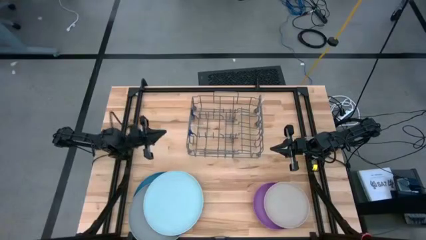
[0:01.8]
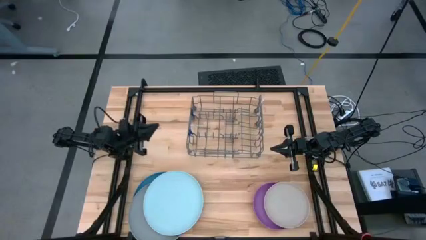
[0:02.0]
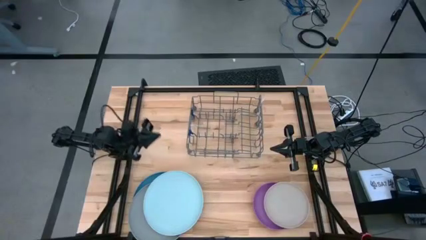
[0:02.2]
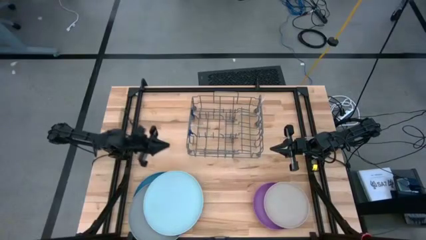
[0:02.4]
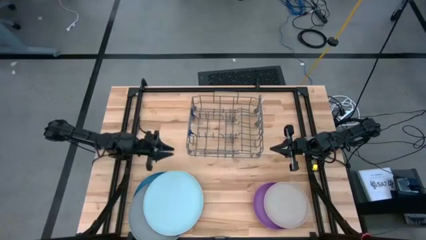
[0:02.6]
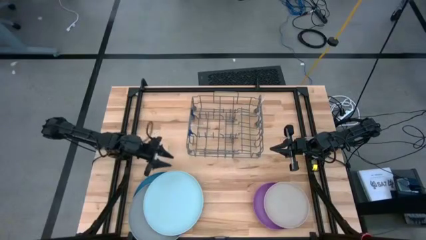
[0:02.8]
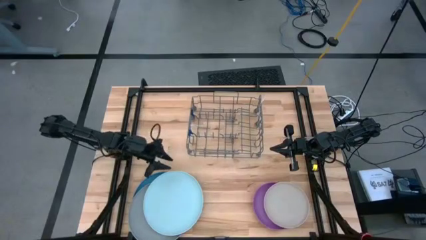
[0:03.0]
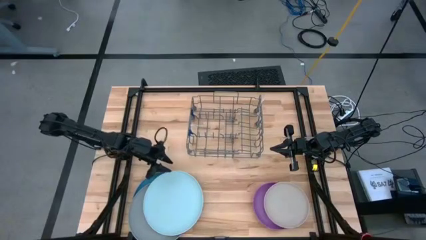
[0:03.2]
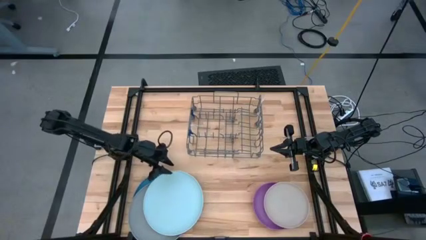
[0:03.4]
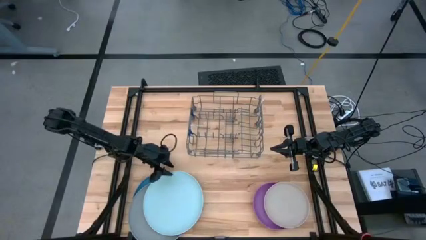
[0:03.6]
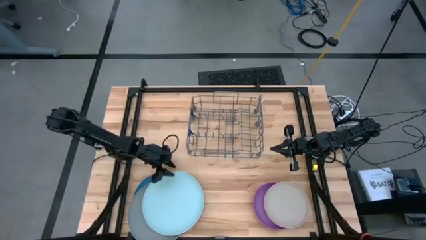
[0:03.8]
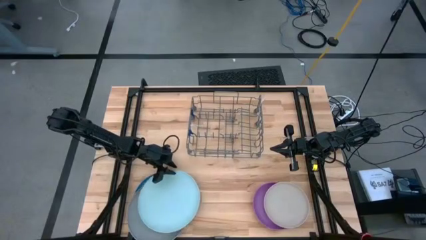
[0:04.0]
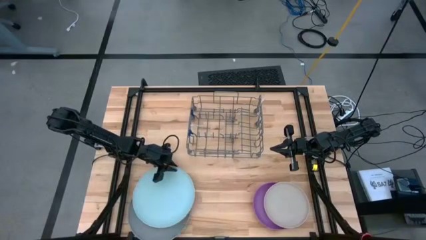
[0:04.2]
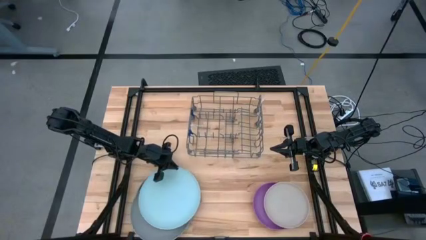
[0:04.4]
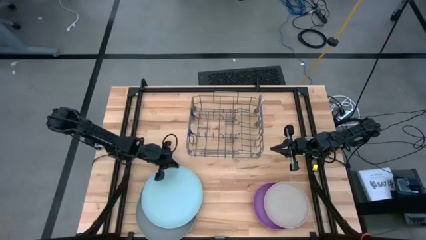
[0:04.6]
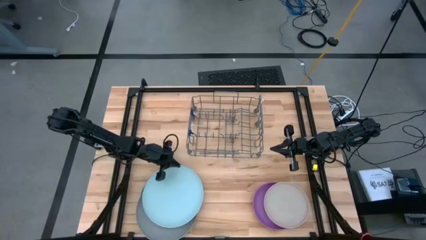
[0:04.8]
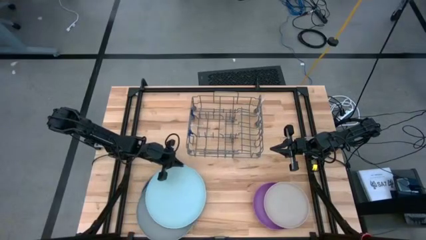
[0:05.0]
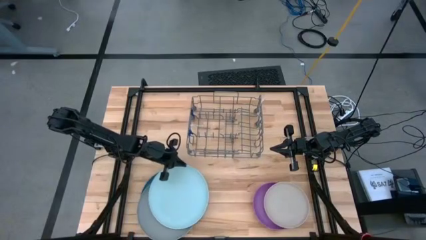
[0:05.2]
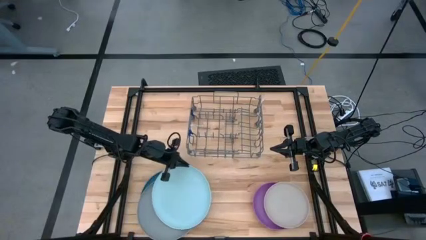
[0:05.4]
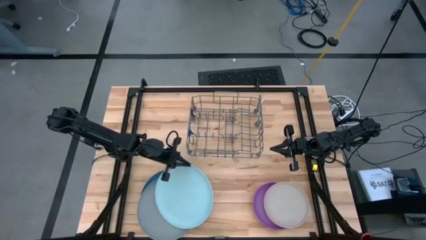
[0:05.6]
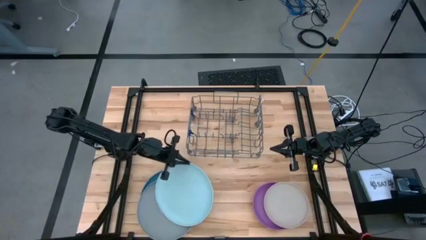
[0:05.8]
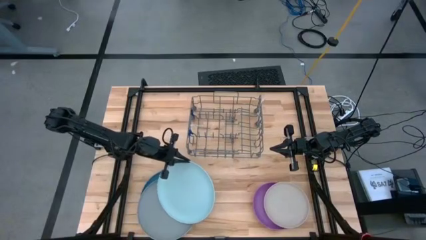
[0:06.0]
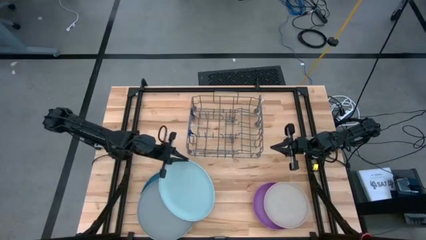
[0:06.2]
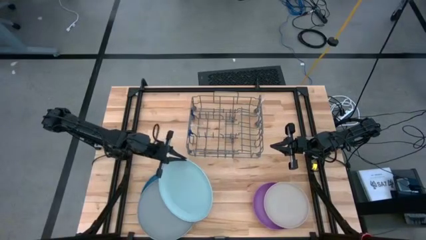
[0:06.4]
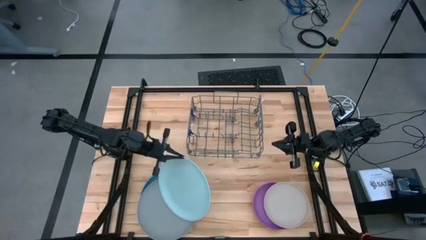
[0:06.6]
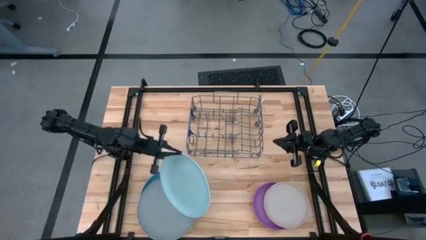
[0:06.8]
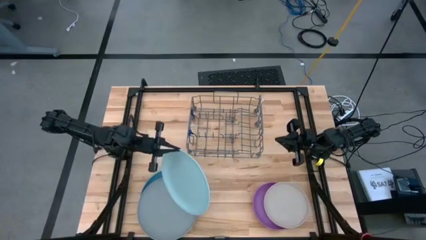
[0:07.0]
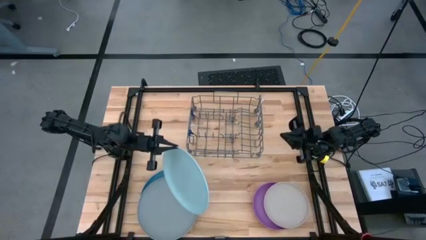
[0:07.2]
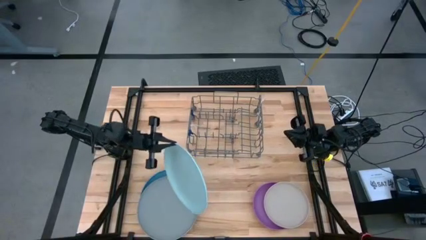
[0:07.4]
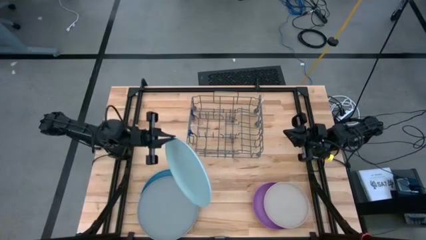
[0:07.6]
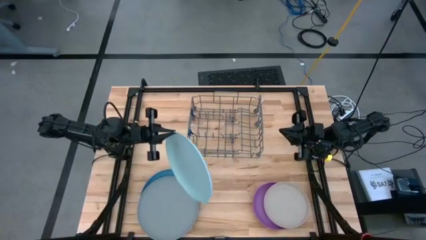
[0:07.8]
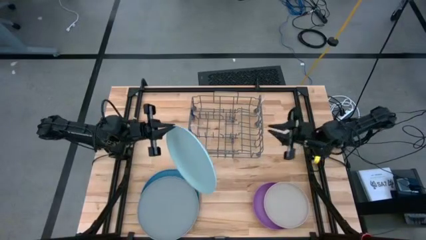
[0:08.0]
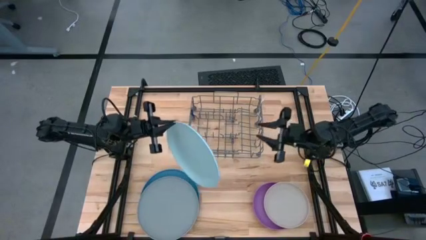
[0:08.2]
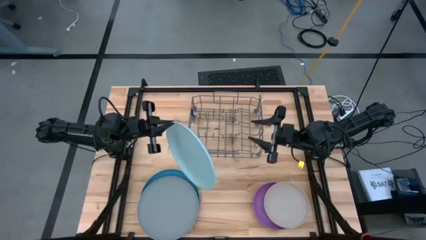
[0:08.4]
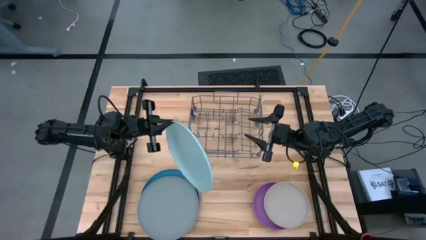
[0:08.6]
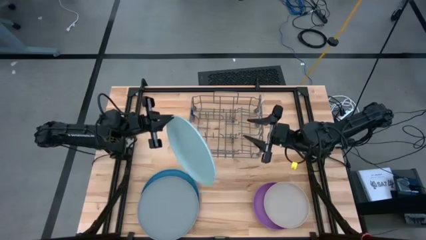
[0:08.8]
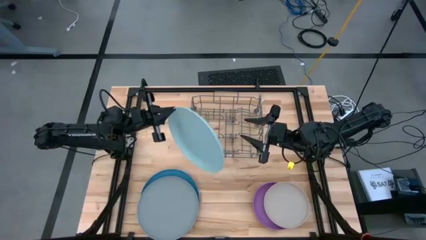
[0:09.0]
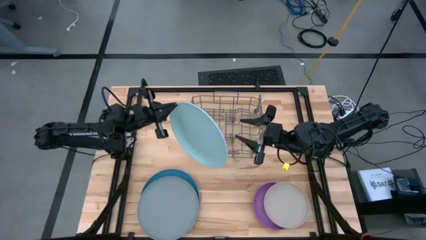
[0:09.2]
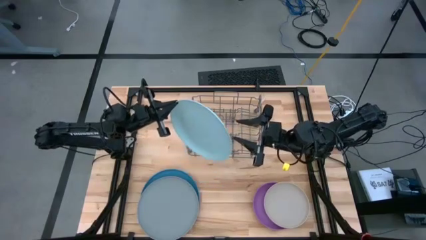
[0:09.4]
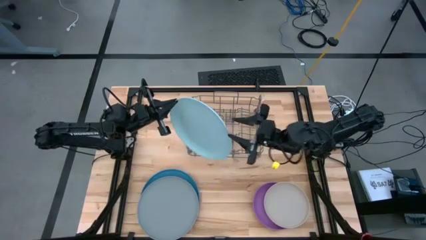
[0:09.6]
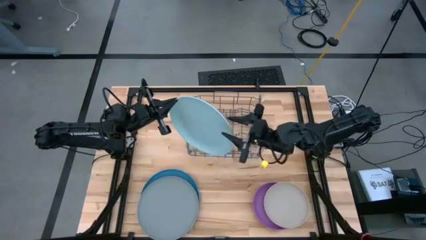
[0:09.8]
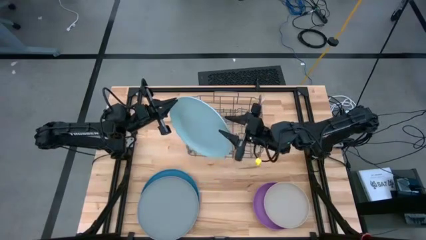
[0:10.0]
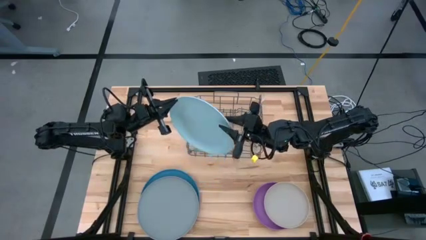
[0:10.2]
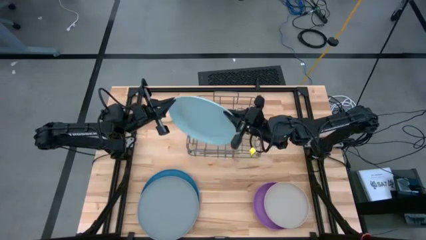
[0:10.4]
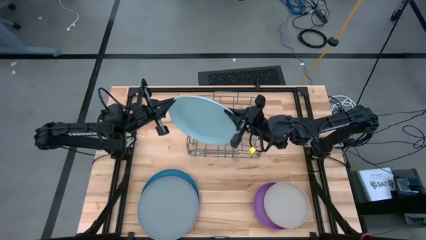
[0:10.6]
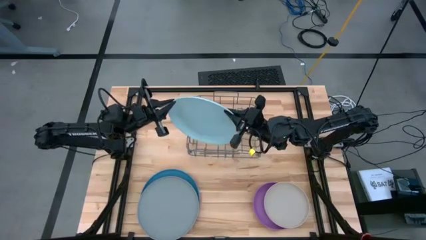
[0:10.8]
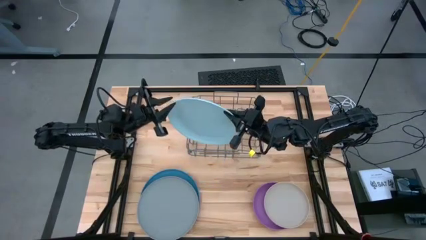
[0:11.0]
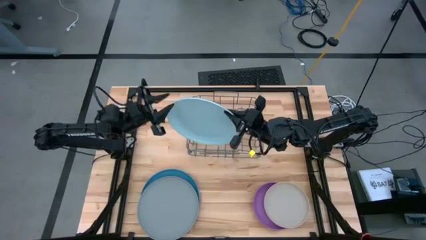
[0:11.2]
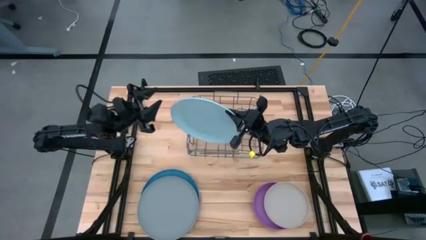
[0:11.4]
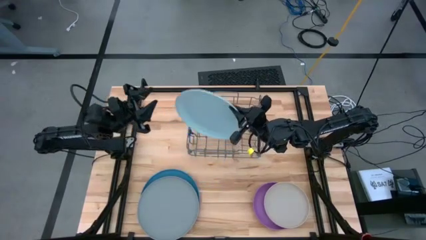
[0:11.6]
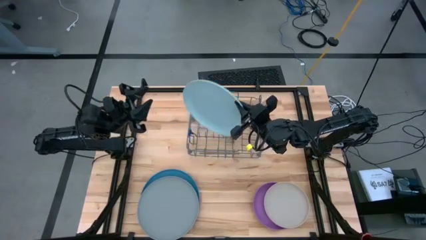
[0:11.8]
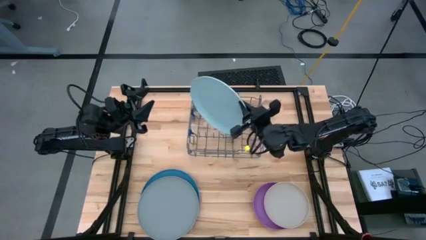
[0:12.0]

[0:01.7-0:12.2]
Task: Sort dishes
Put the light blue plate into the dish rack
